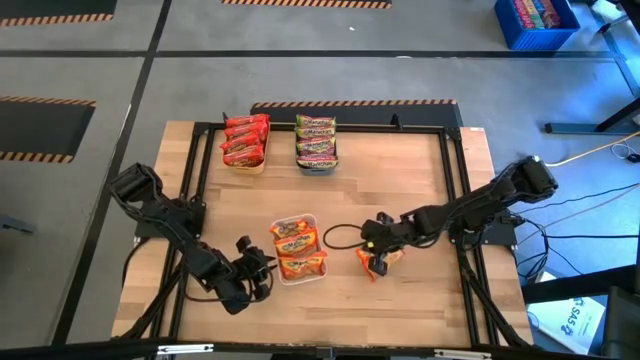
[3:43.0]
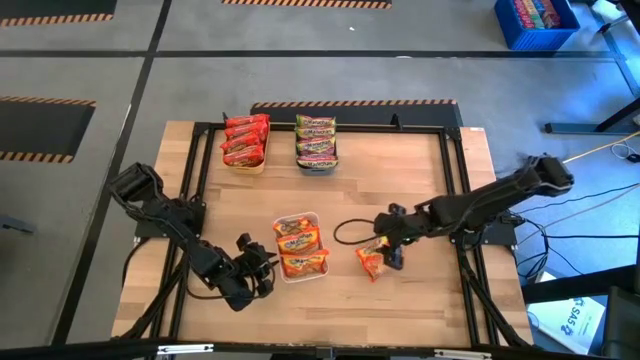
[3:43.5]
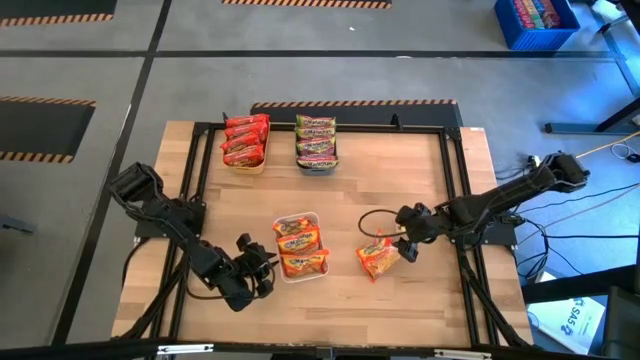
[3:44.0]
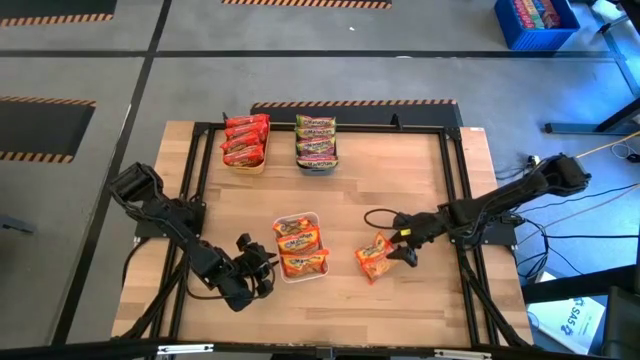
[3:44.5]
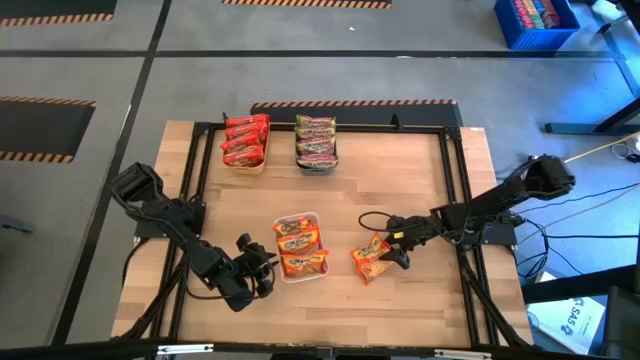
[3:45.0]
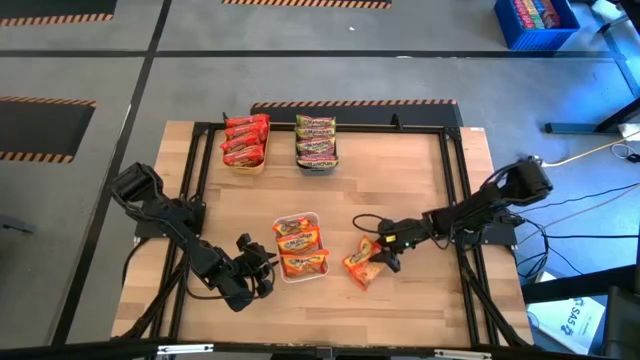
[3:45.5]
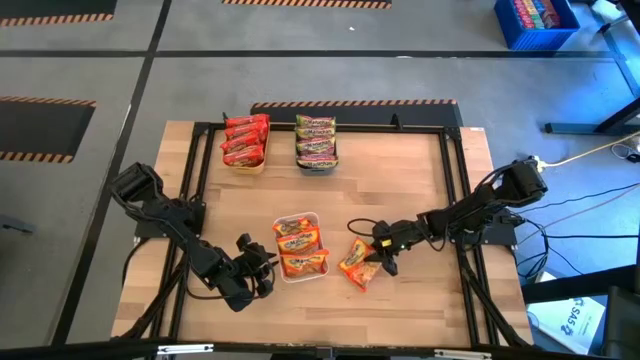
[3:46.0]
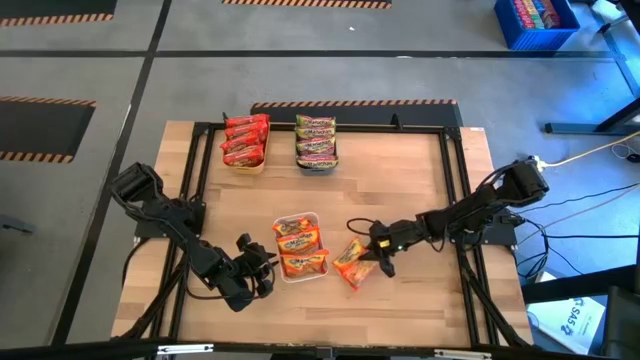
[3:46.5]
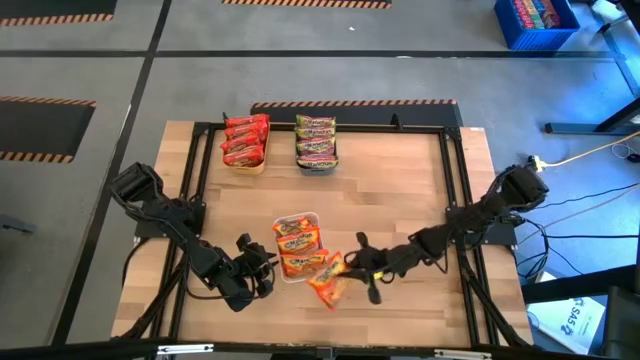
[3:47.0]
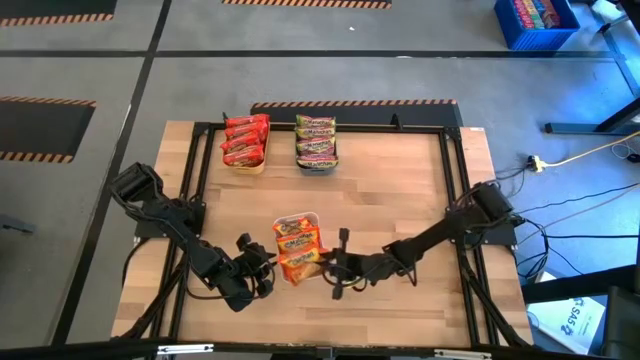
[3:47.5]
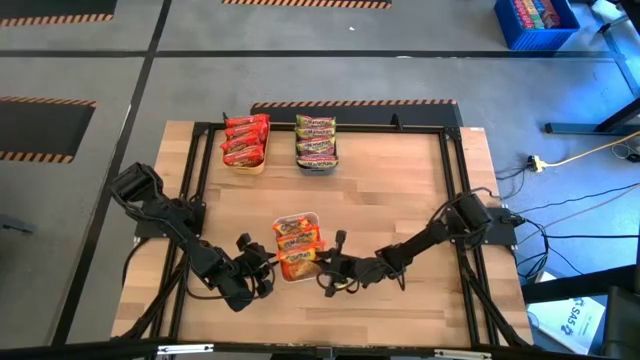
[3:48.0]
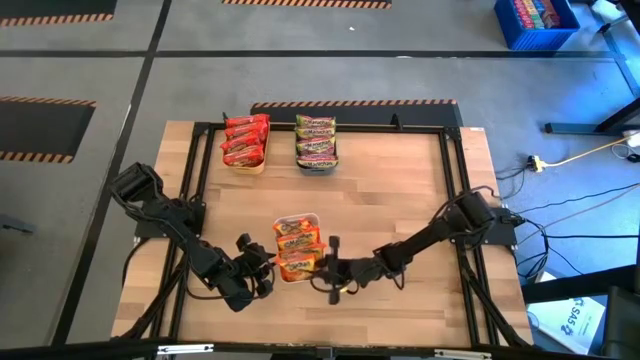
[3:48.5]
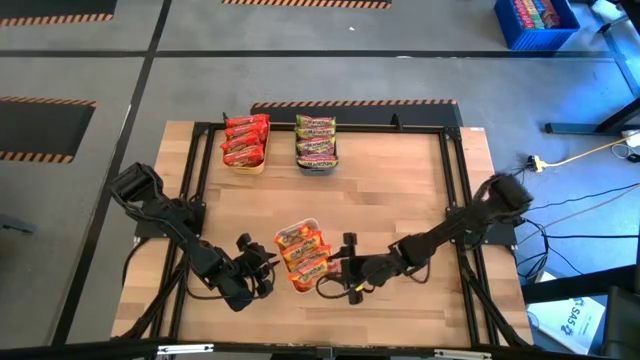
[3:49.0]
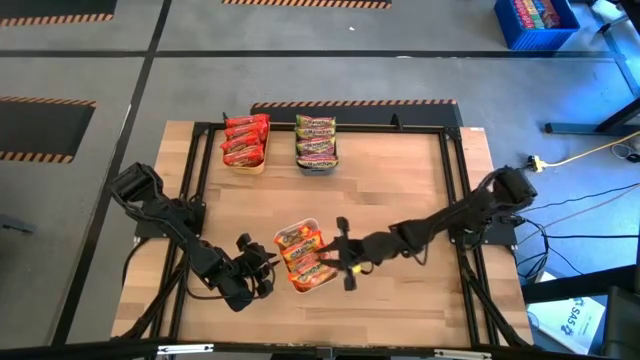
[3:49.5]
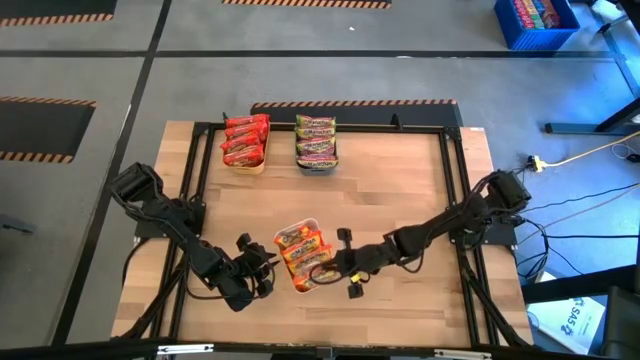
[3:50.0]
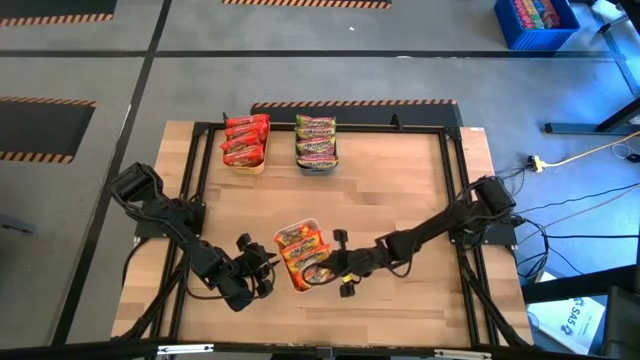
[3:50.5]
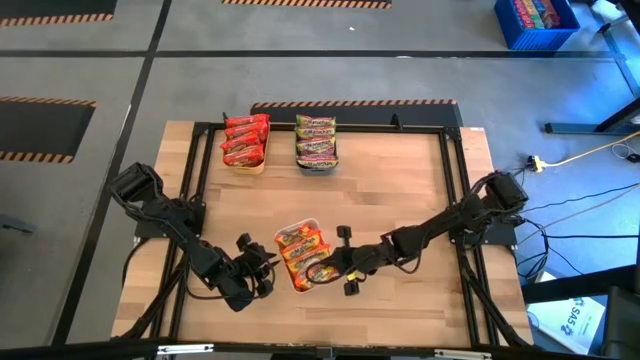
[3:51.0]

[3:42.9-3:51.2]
Task: Sort Maruchan noodles
Put the yellow noodle pack into the white bin

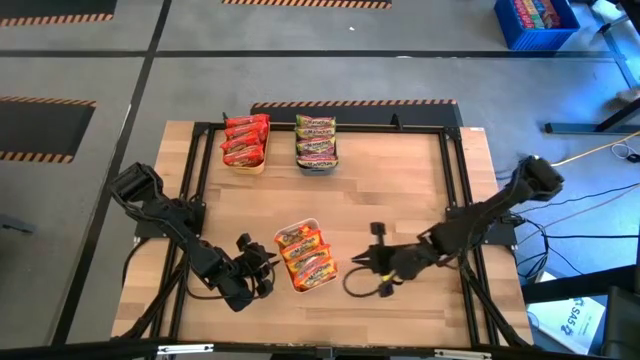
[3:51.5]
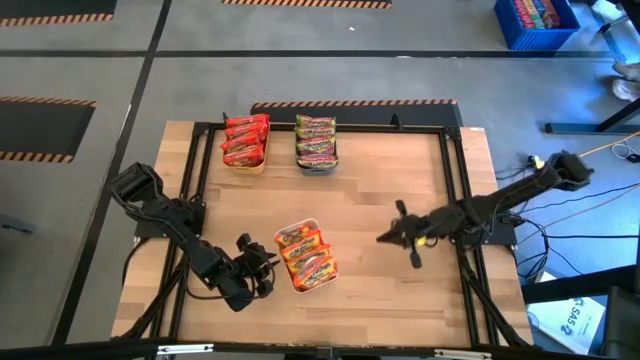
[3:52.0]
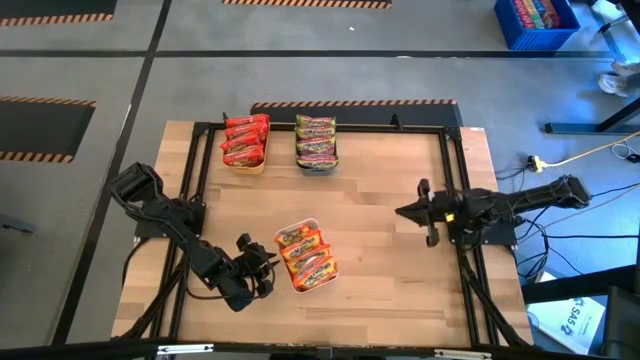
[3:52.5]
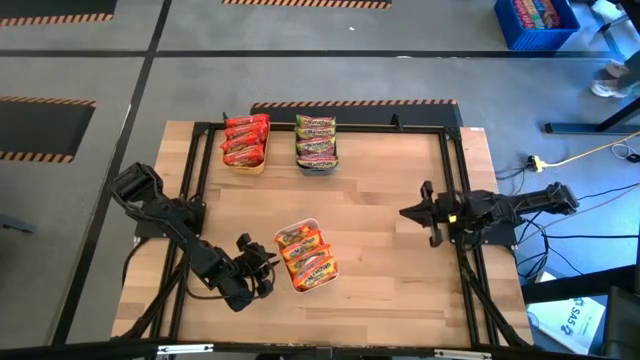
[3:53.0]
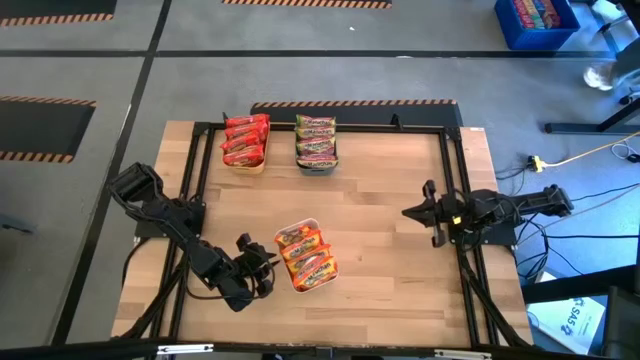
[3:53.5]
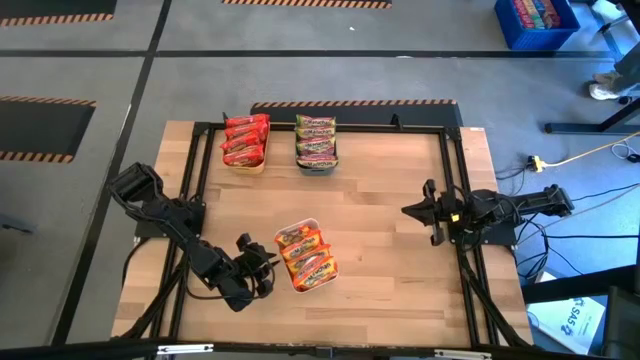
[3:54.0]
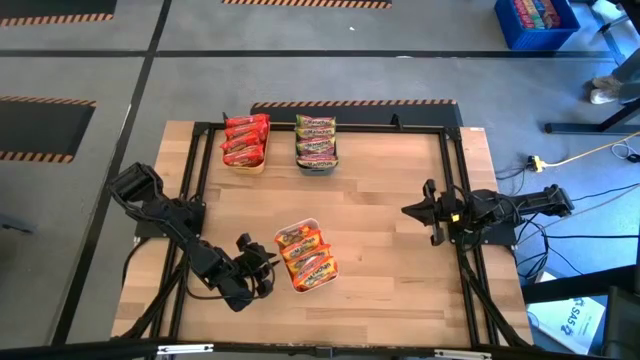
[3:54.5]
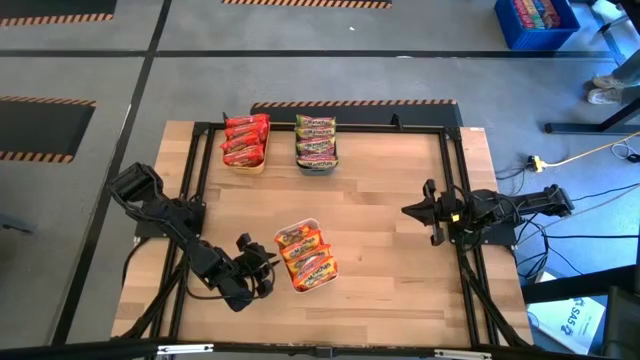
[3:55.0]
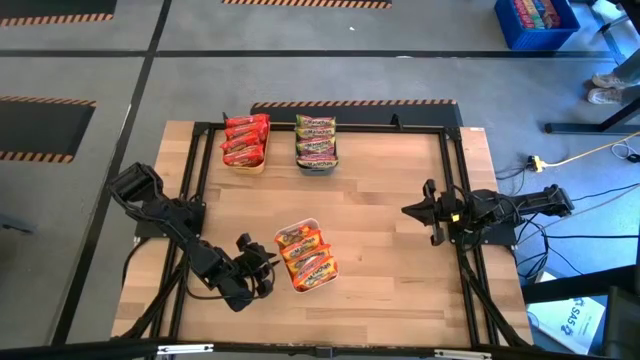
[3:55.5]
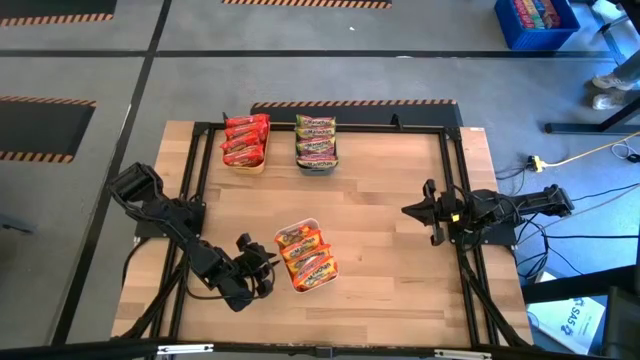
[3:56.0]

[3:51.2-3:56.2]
Return to Home Position

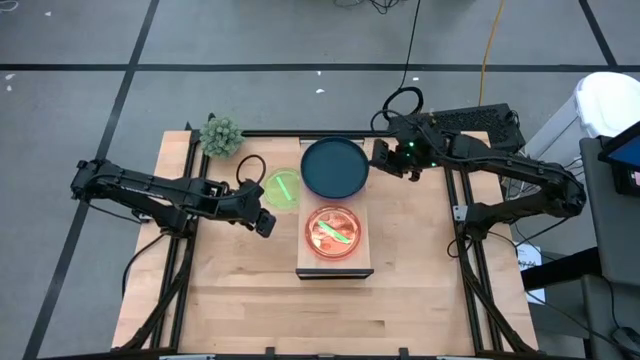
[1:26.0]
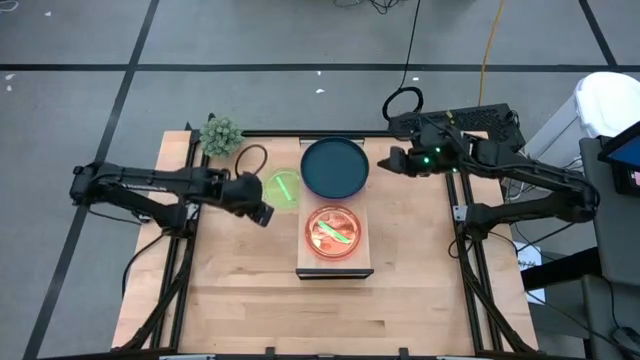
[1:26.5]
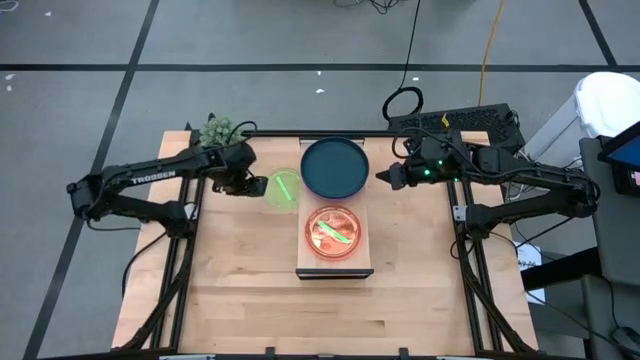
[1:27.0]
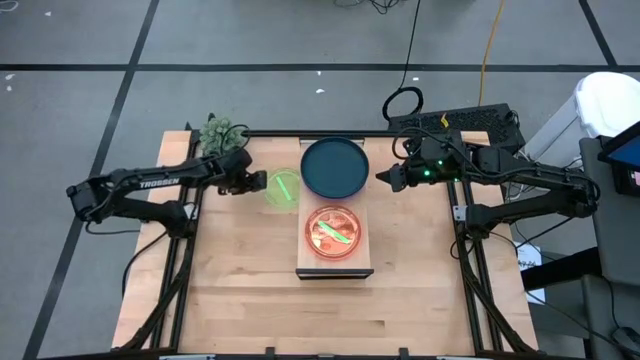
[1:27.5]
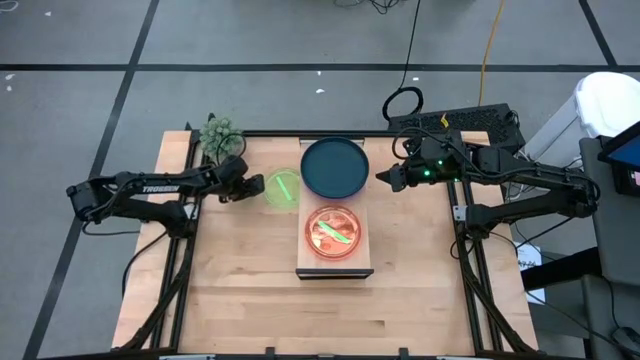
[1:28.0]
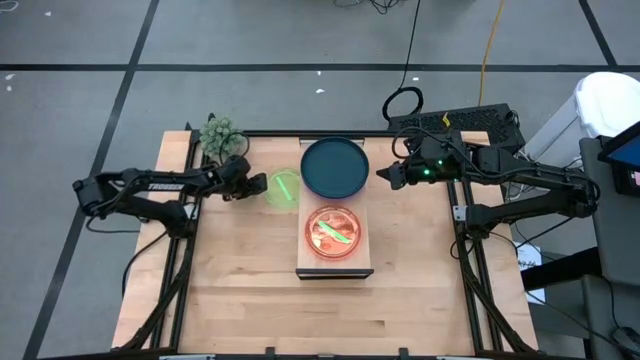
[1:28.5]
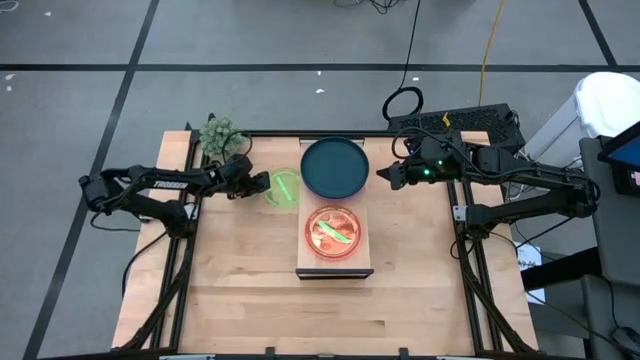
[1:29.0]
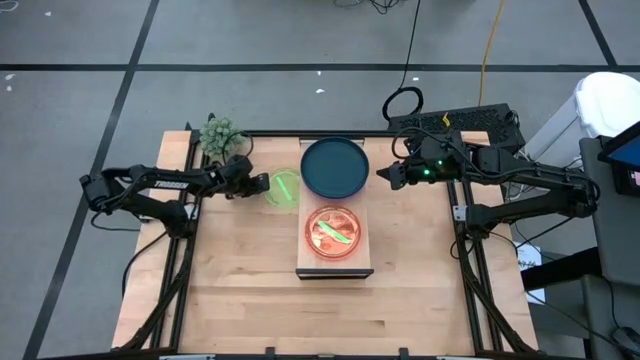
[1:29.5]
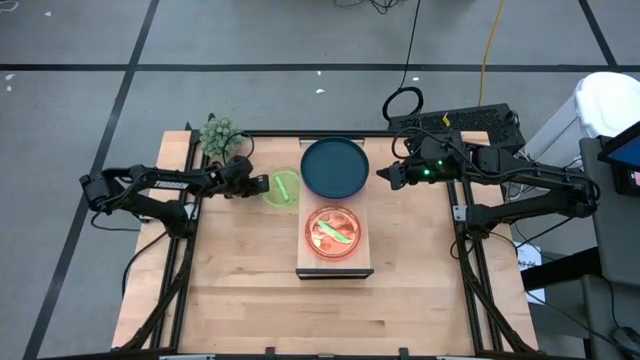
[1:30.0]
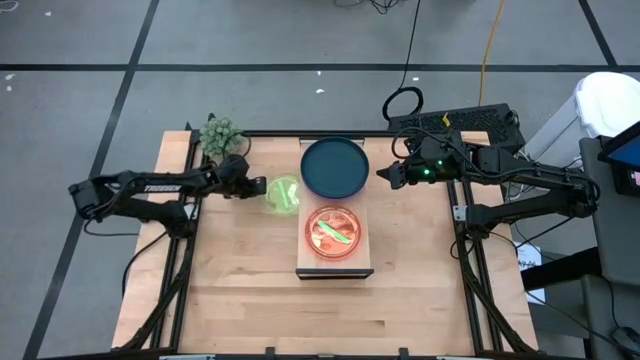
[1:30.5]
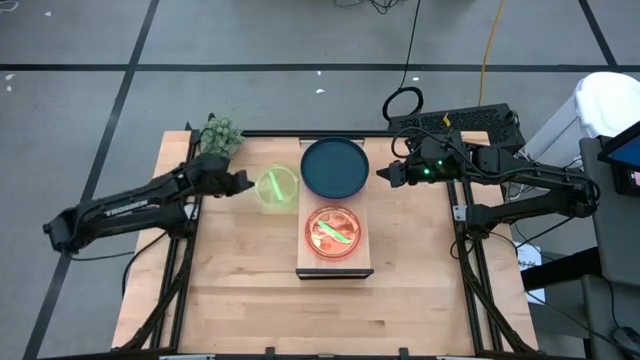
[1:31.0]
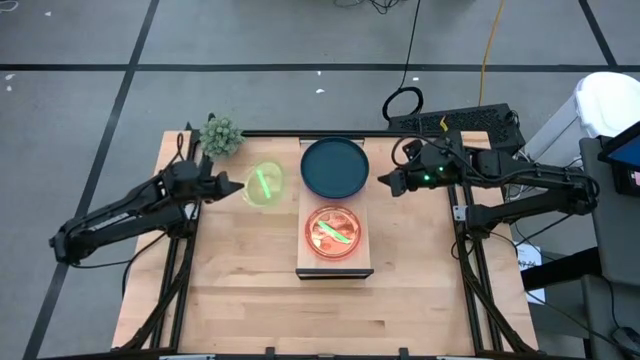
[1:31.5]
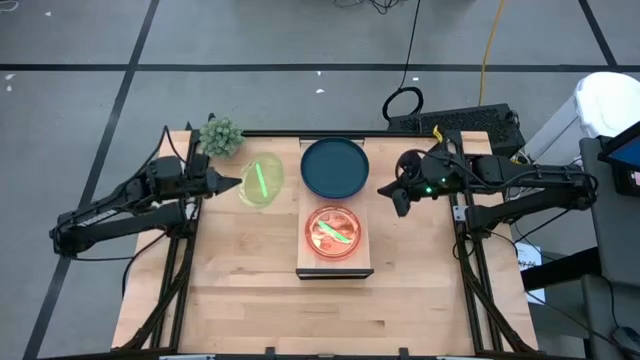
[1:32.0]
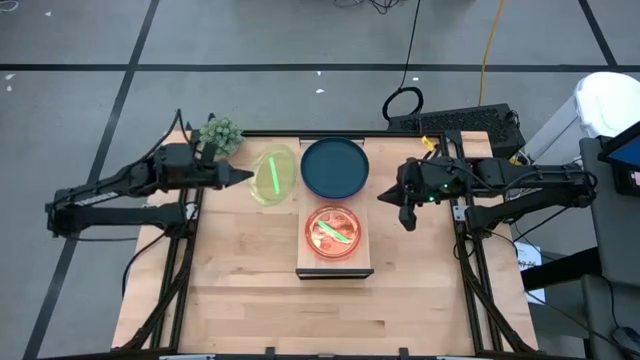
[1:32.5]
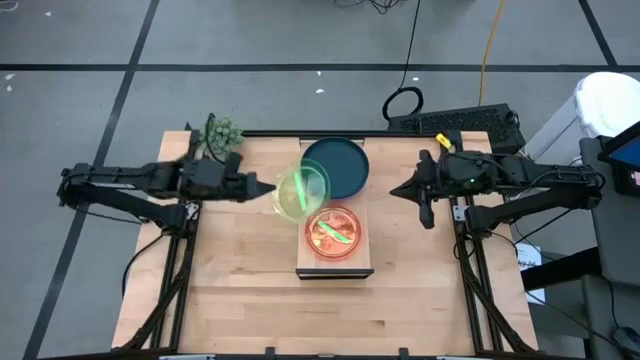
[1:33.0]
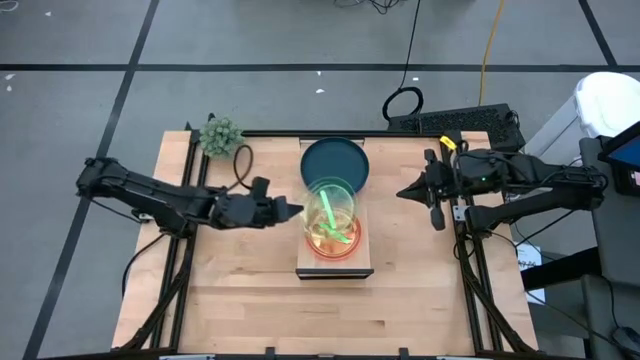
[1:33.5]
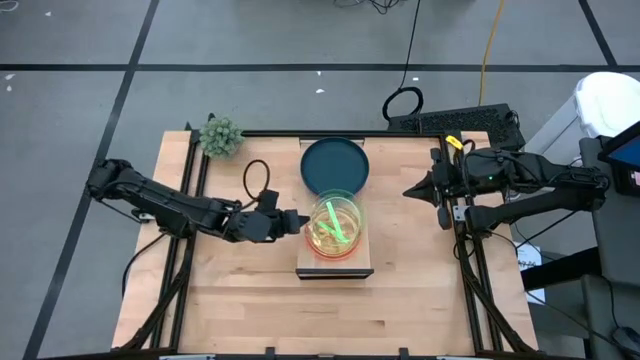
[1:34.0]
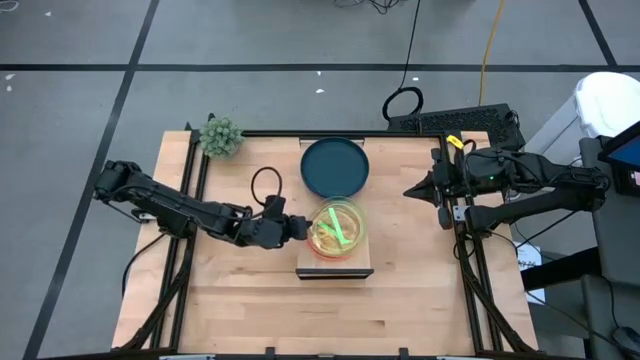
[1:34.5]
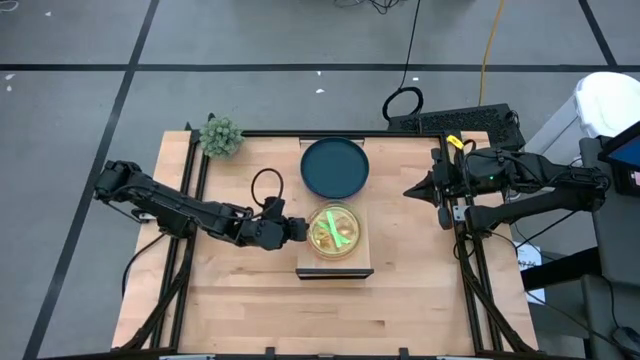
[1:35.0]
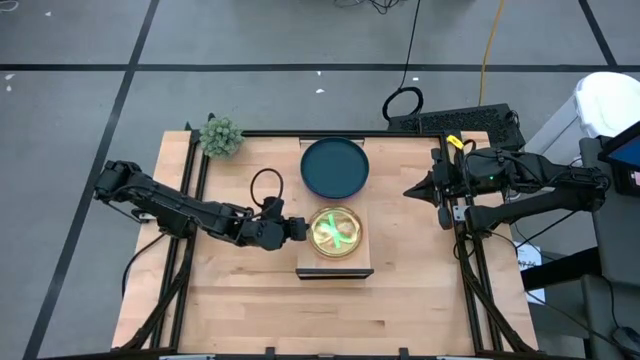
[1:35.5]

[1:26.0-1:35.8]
Task: Place and stack plates onto a shelf
Stack the green plate on top of the other green plate on the shelf
